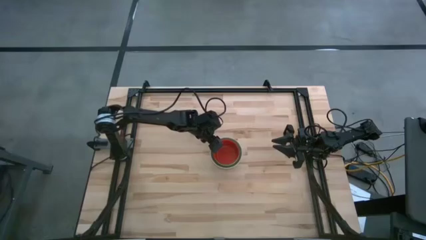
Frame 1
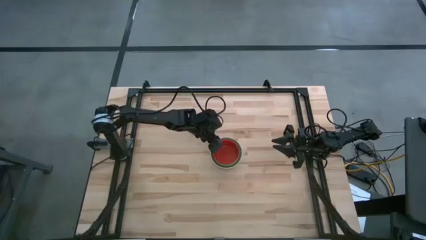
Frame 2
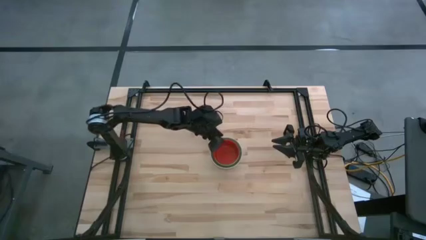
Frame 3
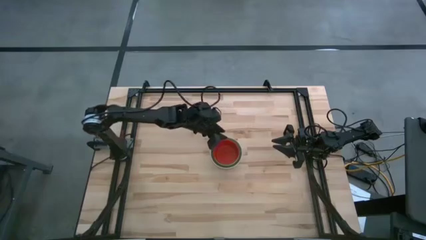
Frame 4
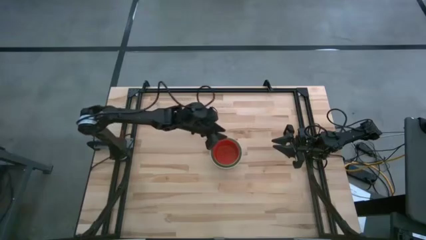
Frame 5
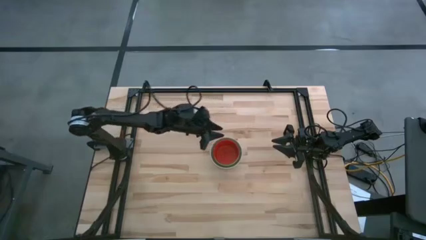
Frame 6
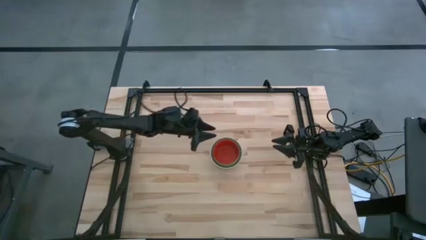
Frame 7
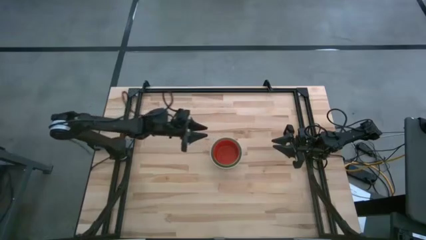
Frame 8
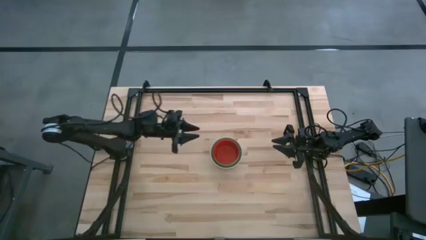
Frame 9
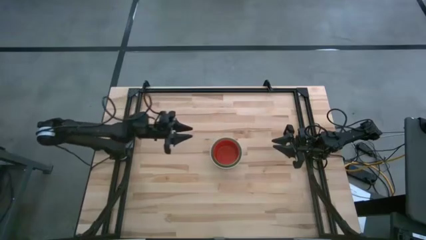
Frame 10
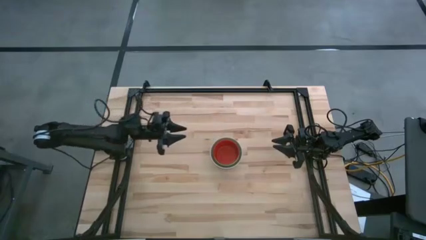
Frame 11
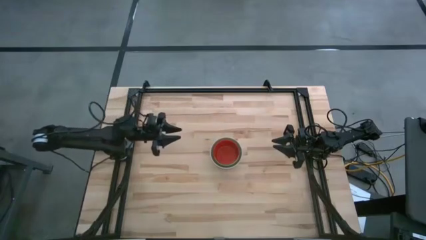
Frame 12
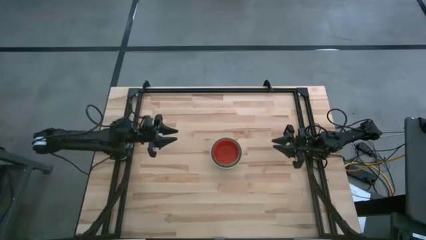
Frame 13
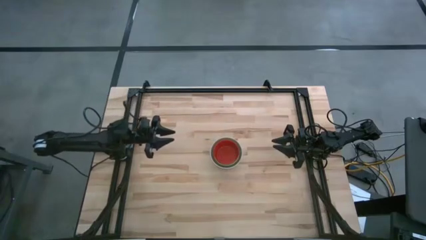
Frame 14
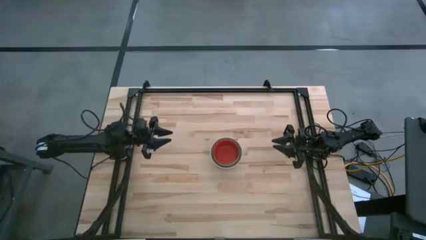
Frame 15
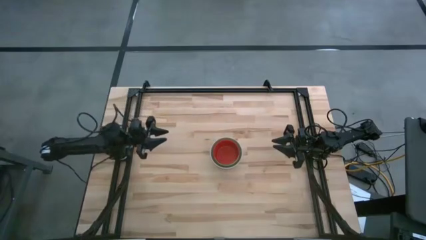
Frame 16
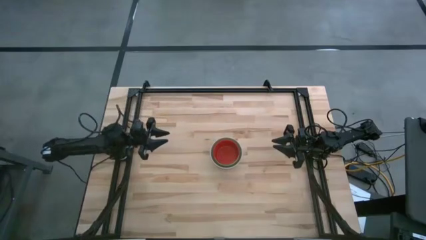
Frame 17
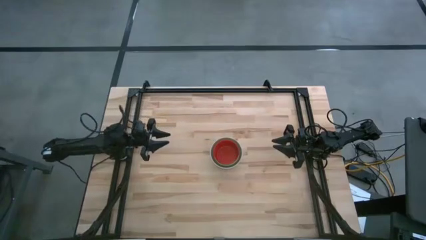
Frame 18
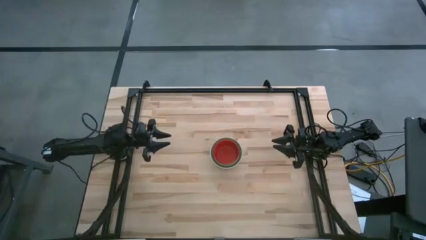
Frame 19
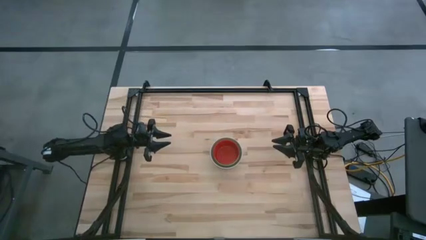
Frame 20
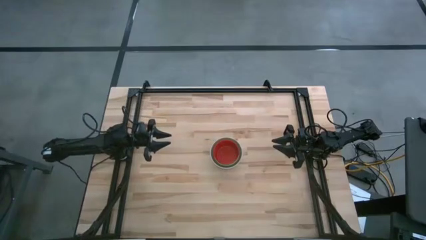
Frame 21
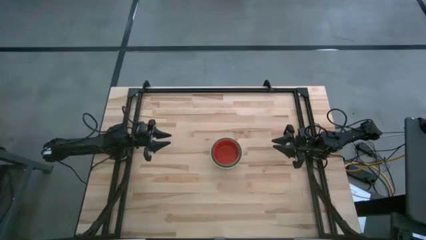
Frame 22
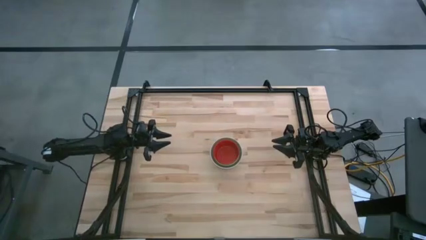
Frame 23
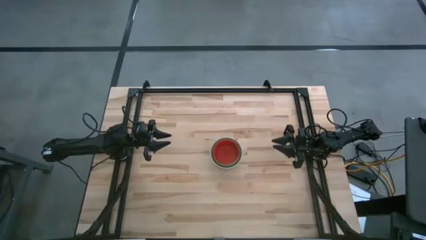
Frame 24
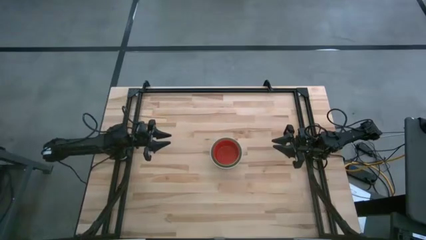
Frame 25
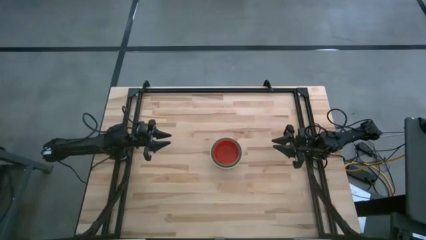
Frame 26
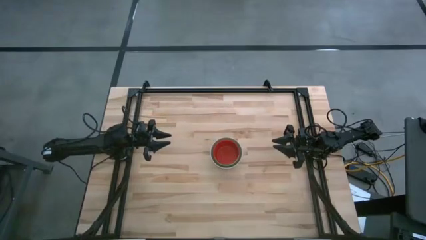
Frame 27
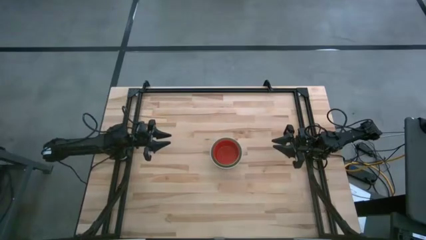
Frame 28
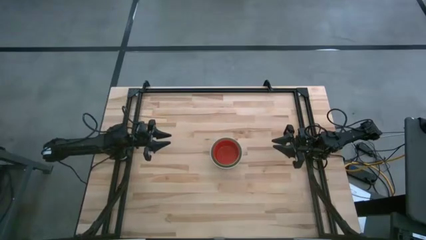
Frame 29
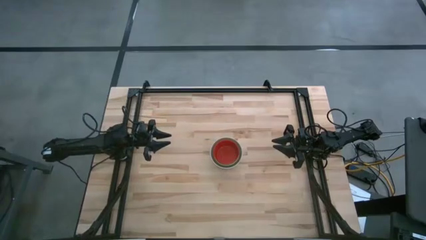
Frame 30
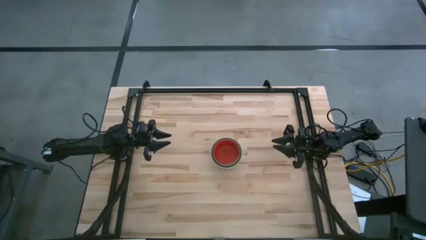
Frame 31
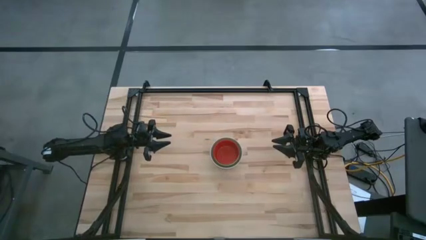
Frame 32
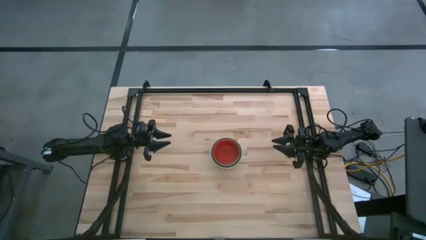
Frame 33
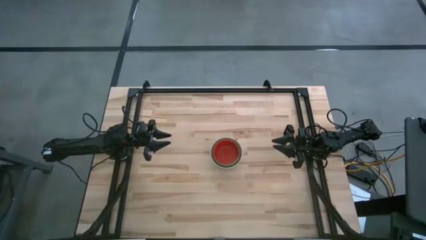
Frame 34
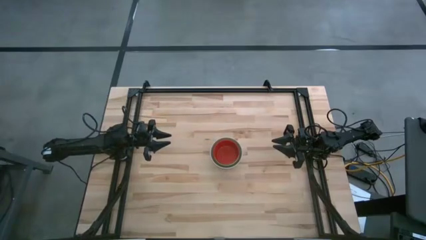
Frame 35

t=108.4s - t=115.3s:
Return to Home Position

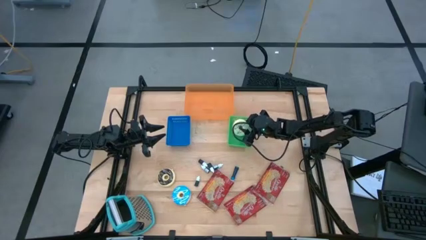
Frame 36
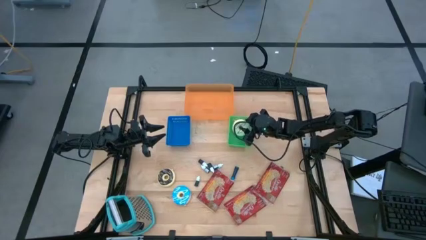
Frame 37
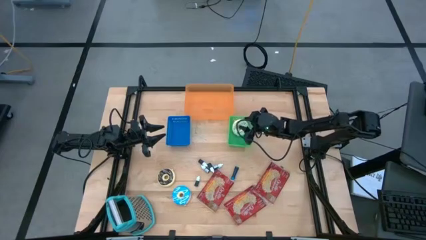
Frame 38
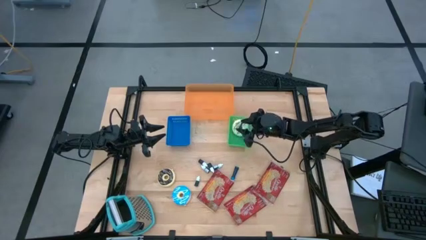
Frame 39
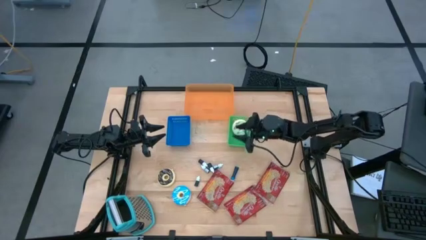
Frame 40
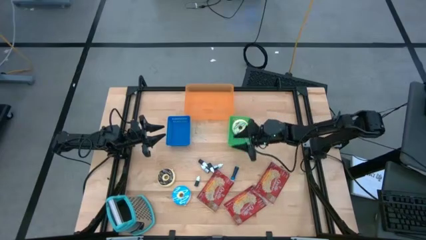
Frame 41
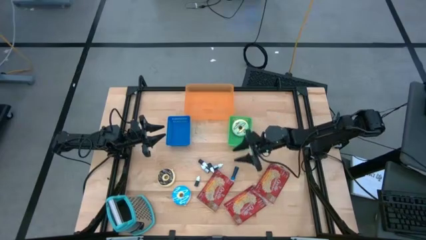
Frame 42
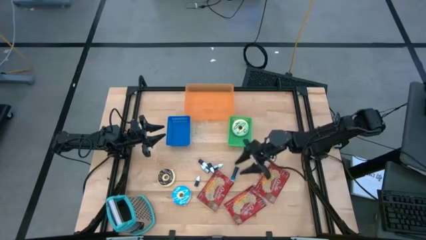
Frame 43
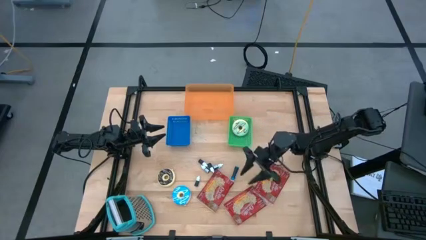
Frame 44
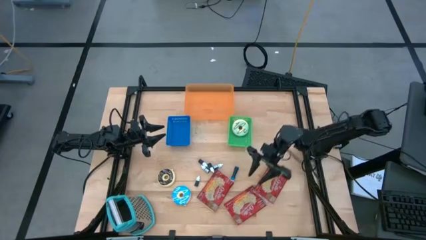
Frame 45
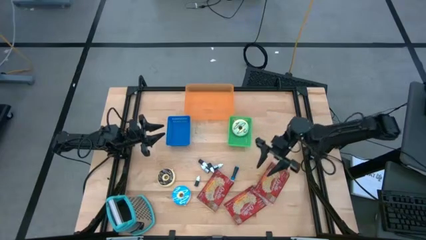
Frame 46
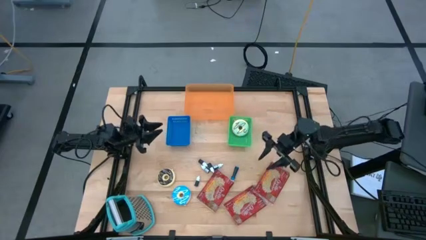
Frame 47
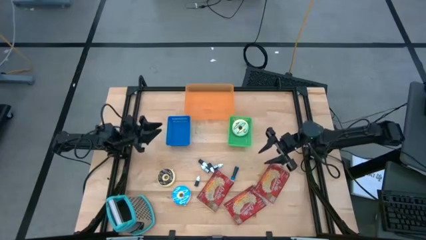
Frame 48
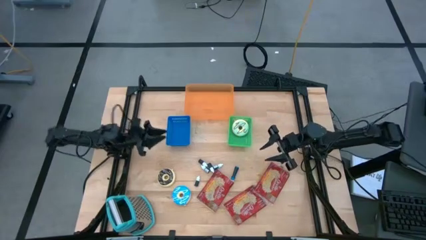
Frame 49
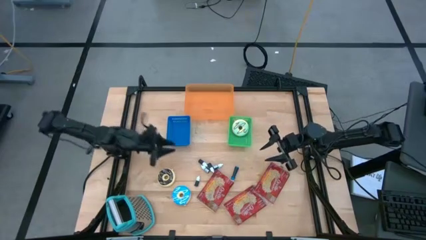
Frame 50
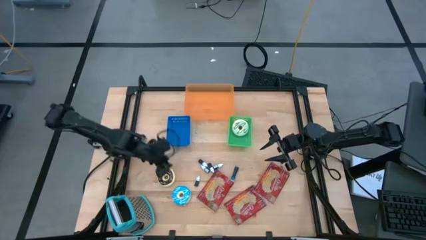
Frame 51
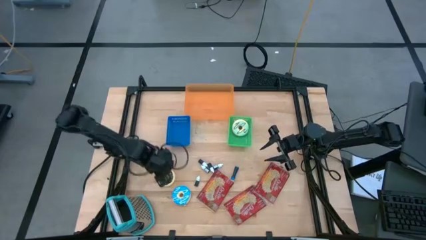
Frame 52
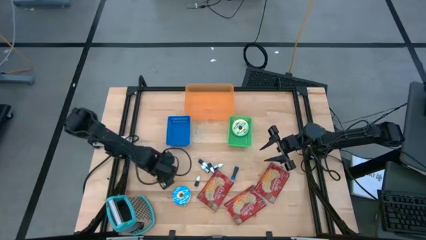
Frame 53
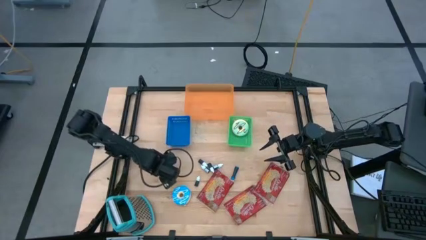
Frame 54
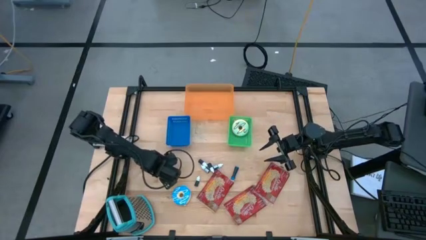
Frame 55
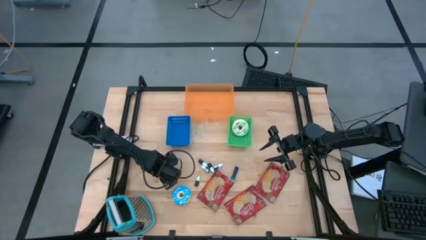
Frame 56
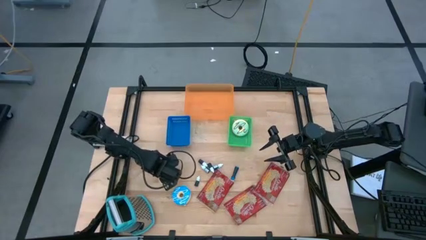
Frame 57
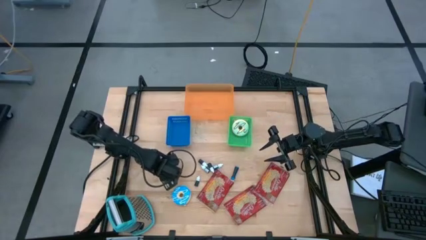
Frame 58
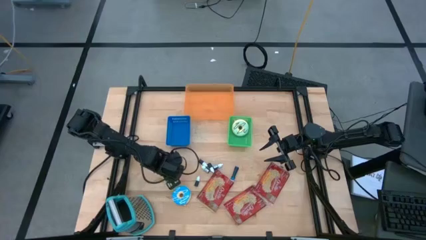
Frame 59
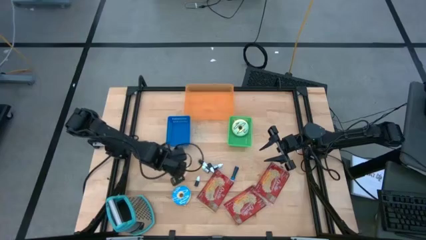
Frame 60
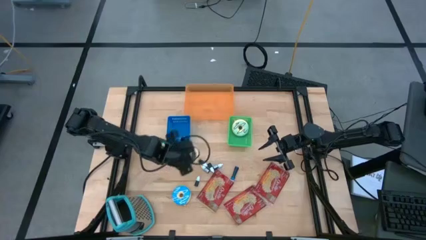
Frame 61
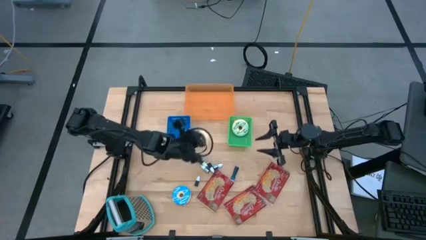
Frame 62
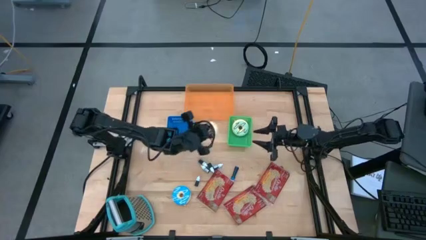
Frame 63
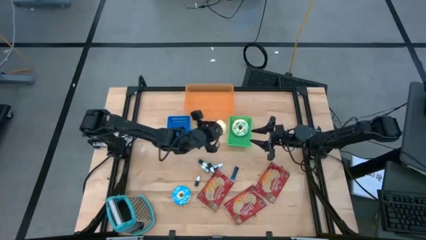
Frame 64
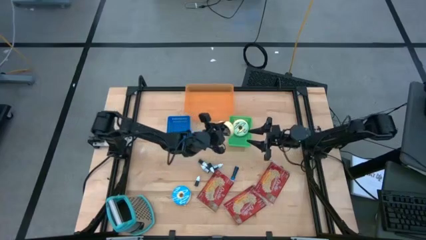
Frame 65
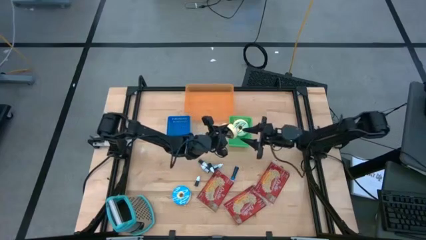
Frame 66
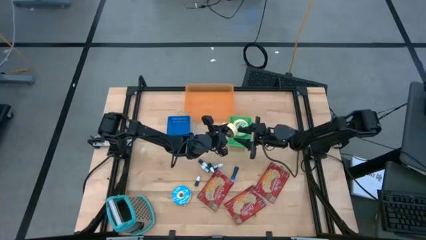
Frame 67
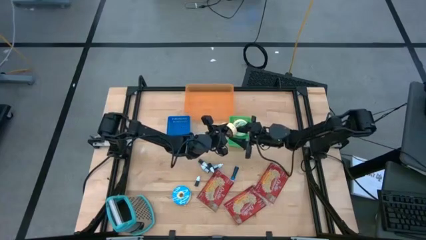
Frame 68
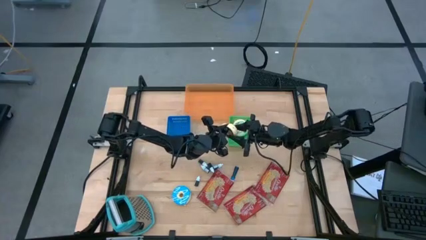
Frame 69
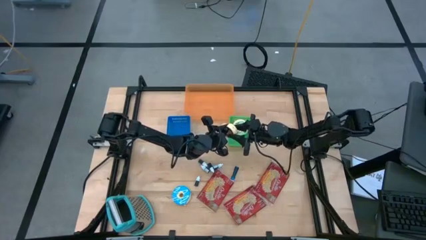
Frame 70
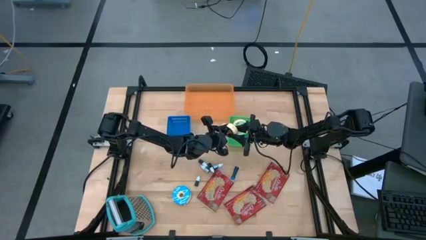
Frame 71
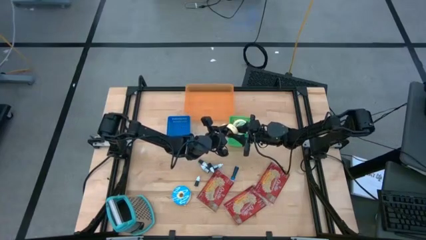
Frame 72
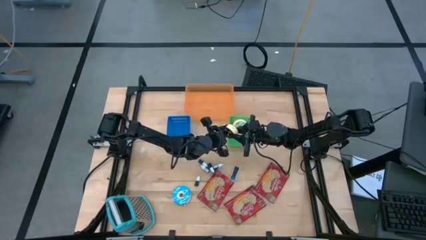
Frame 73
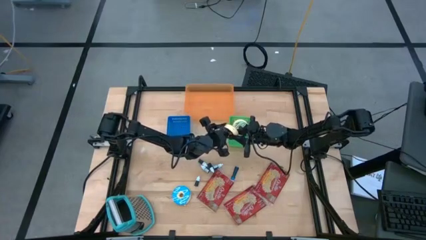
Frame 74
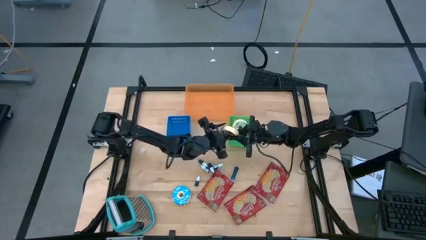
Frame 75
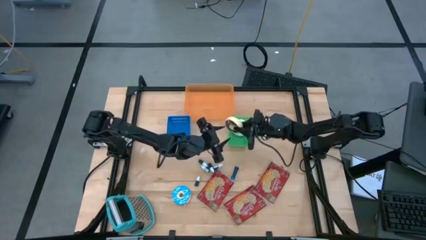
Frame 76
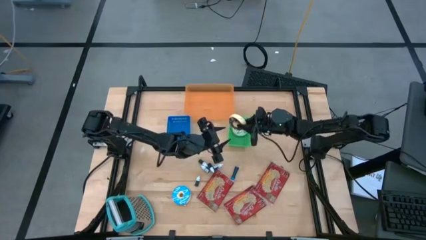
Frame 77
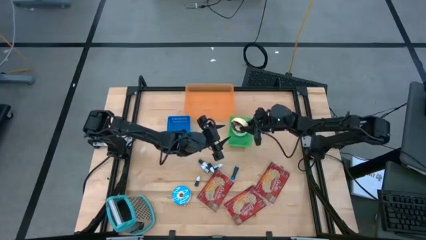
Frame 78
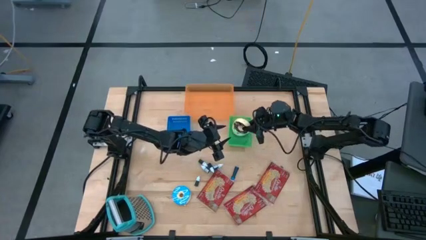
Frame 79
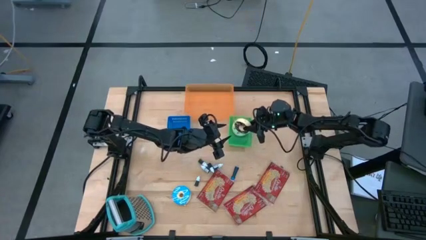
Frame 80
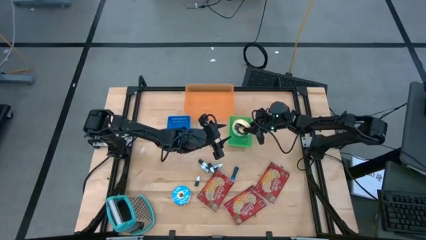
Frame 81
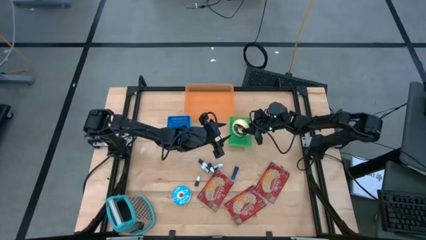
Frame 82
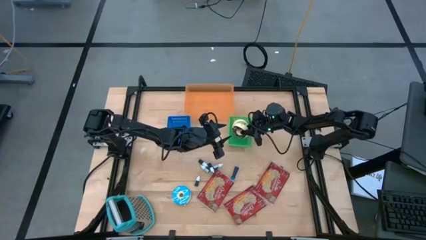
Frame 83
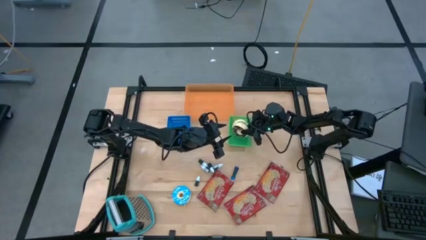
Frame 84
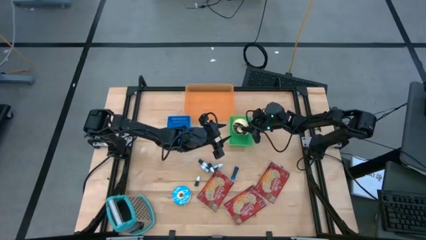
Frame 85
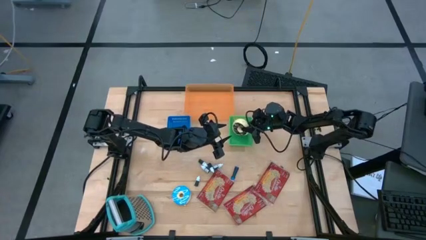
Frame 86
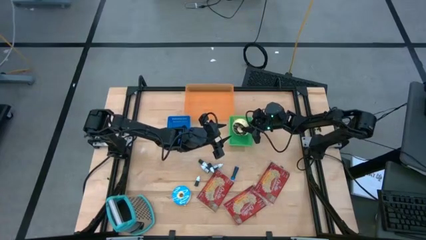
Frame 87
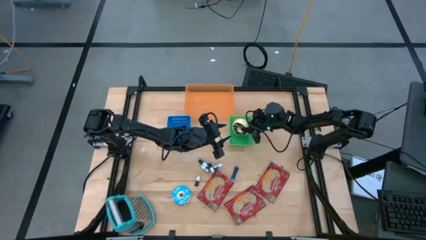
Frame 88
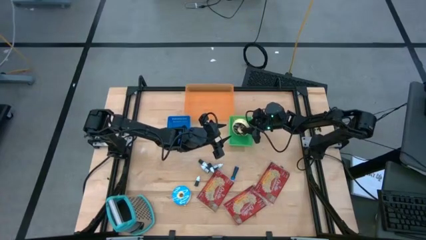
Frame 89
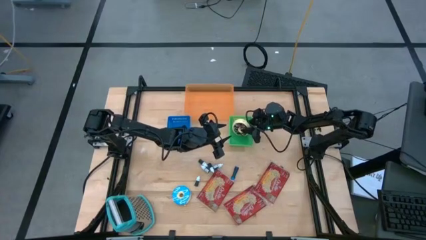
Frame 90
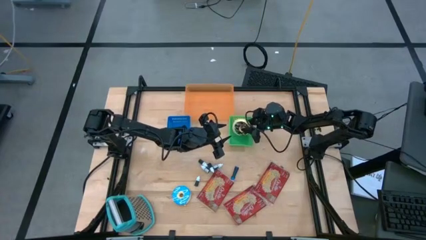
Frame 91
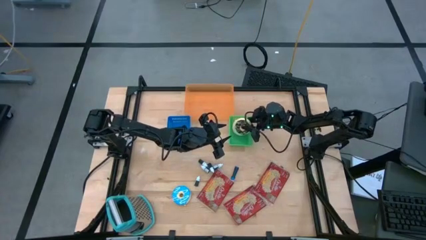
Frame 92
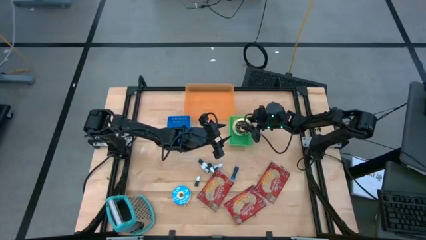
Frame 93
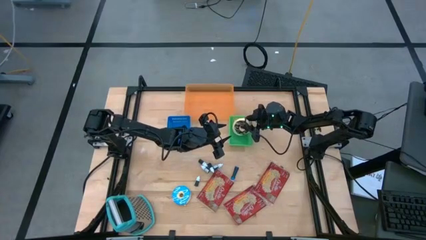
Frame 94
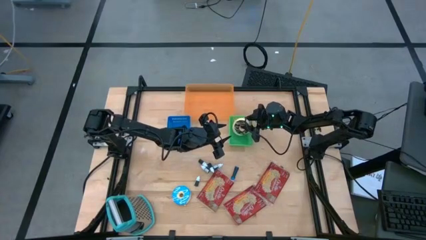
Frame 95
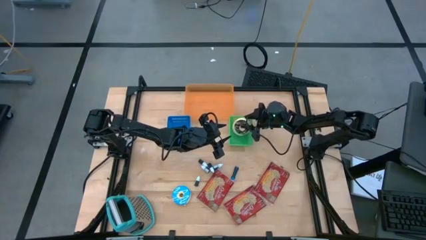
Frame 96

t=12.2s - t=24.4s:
Put the black doughnut into the green bin
